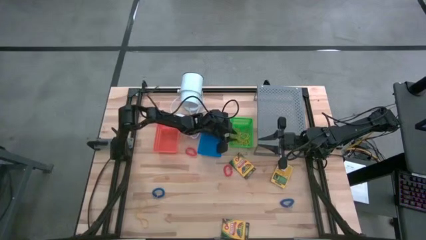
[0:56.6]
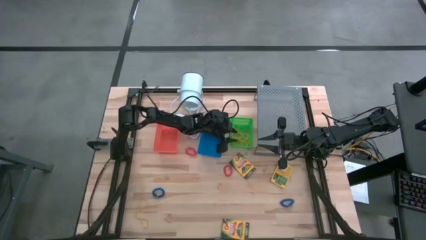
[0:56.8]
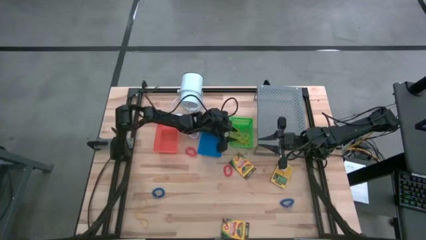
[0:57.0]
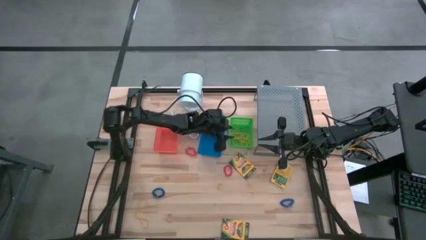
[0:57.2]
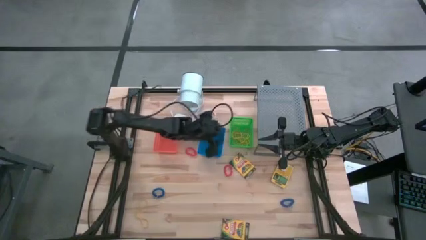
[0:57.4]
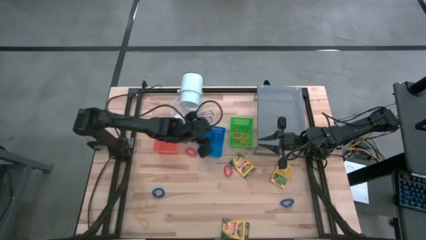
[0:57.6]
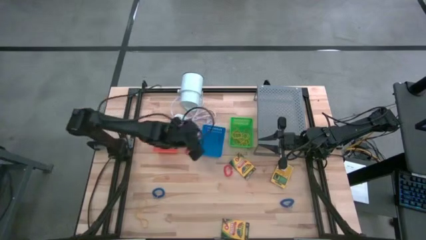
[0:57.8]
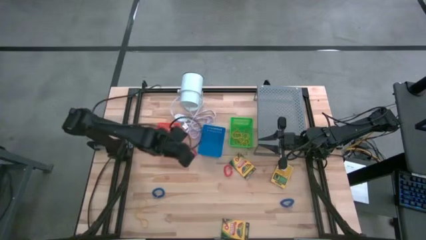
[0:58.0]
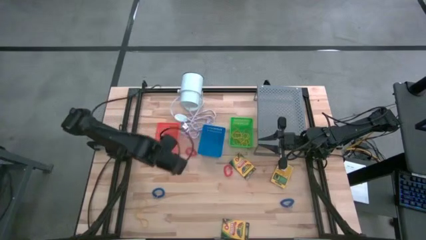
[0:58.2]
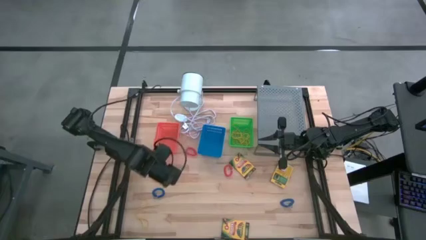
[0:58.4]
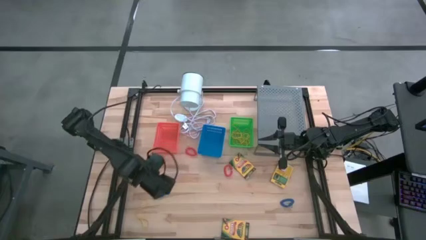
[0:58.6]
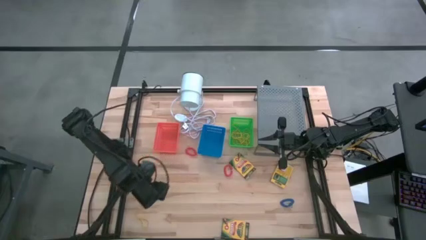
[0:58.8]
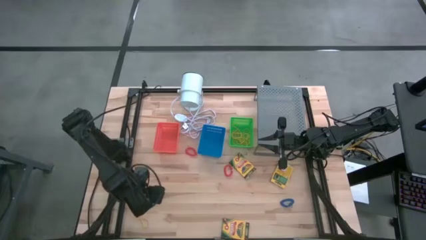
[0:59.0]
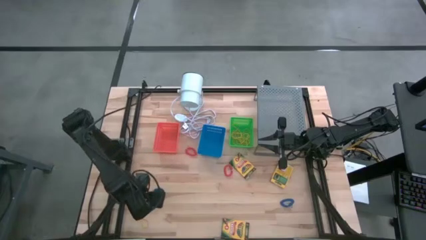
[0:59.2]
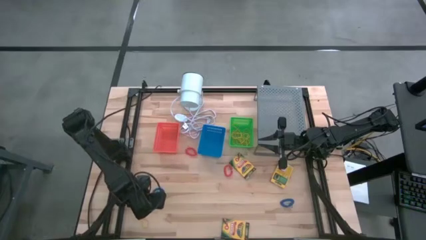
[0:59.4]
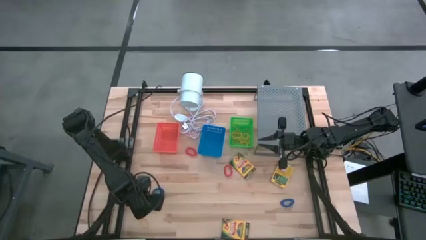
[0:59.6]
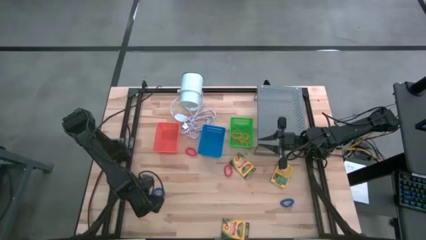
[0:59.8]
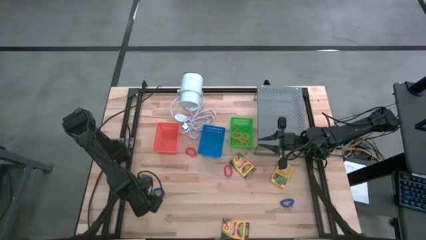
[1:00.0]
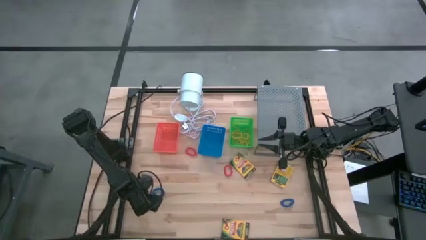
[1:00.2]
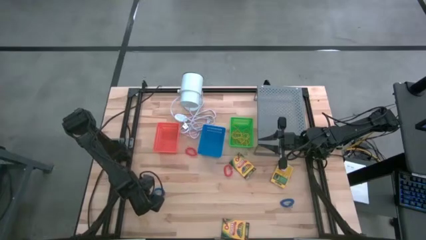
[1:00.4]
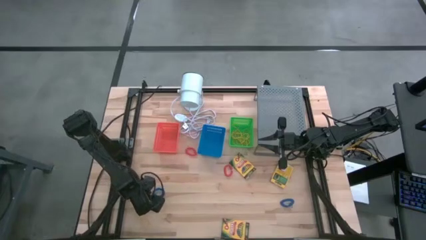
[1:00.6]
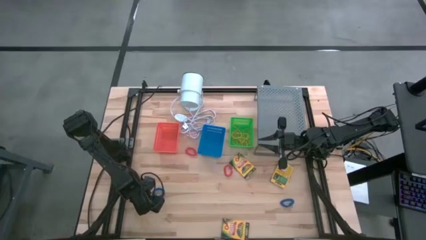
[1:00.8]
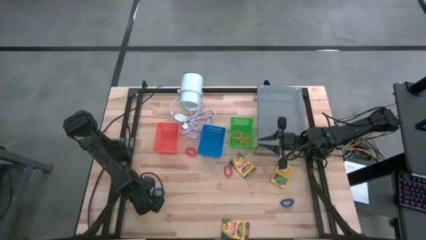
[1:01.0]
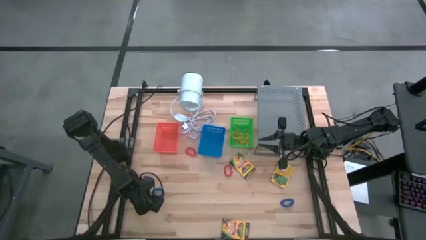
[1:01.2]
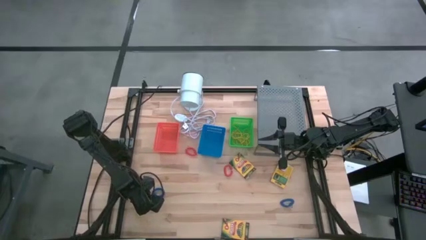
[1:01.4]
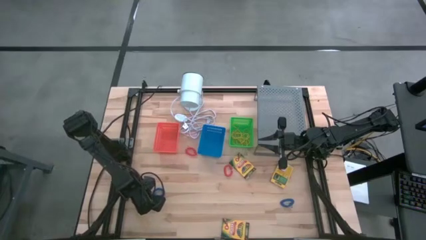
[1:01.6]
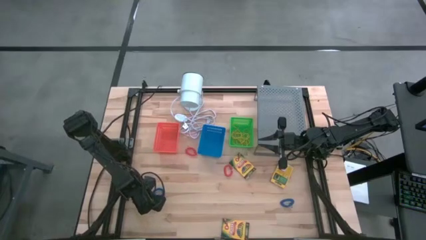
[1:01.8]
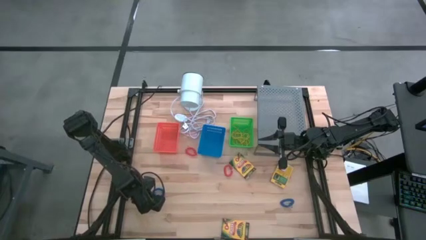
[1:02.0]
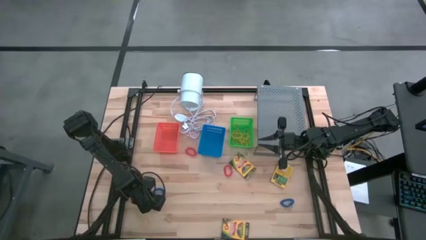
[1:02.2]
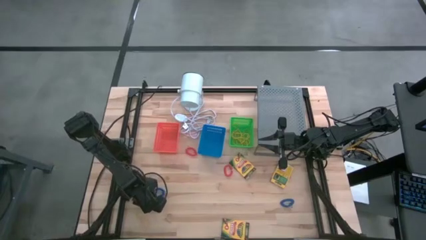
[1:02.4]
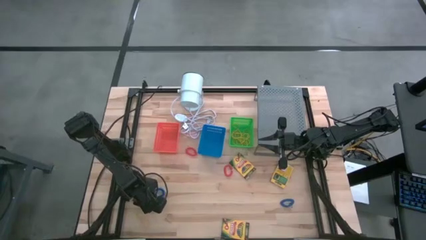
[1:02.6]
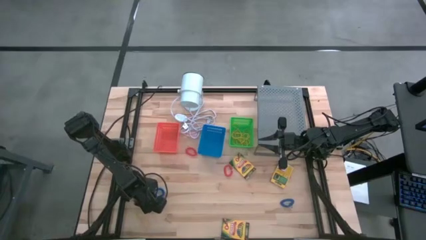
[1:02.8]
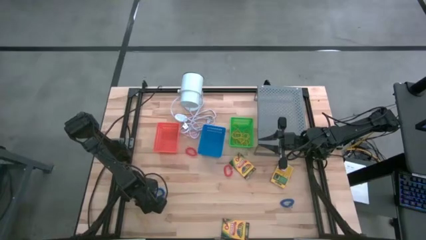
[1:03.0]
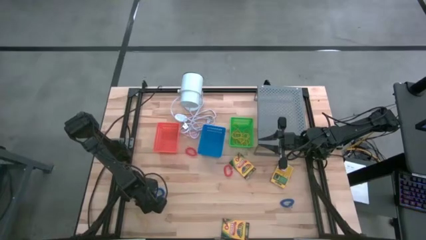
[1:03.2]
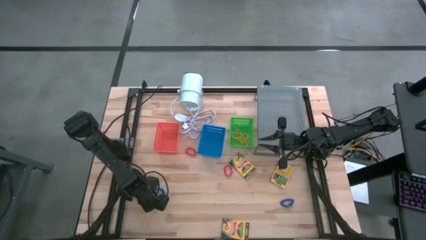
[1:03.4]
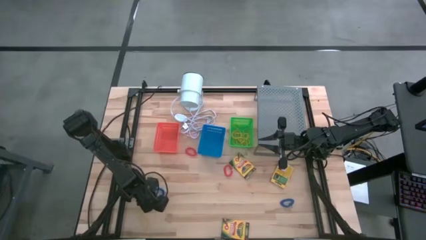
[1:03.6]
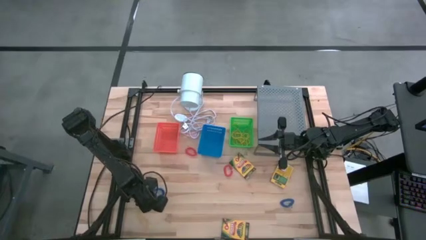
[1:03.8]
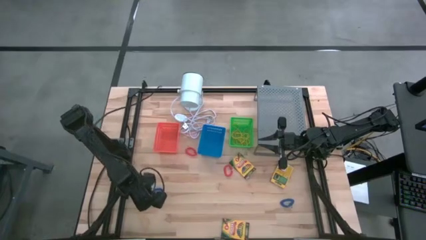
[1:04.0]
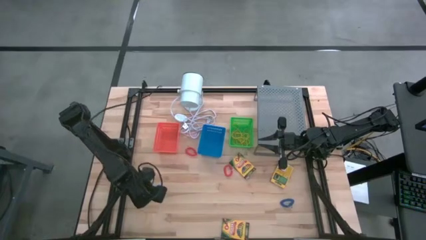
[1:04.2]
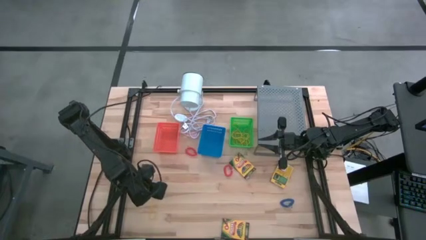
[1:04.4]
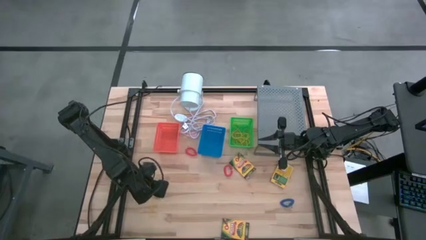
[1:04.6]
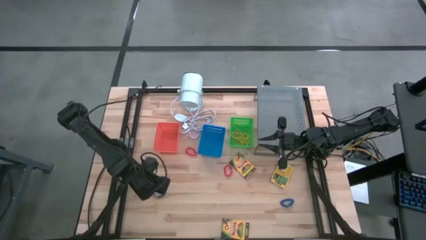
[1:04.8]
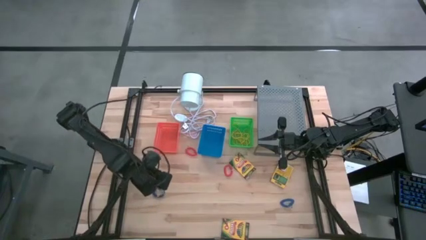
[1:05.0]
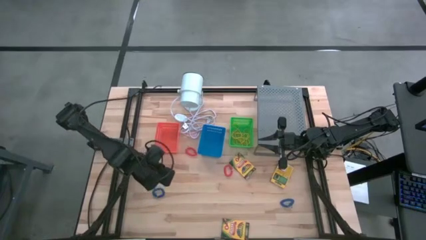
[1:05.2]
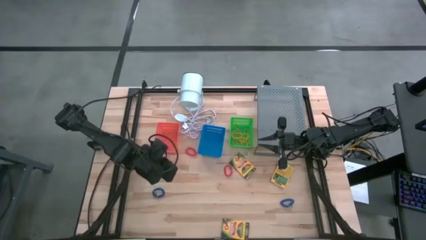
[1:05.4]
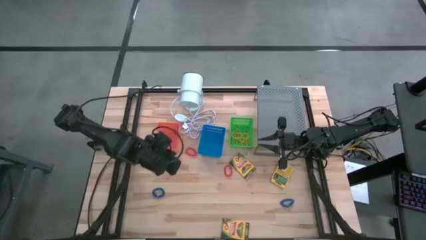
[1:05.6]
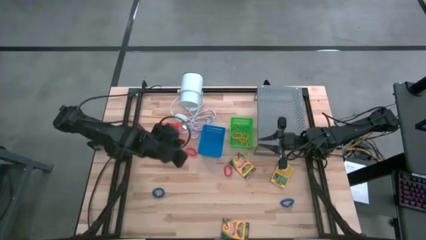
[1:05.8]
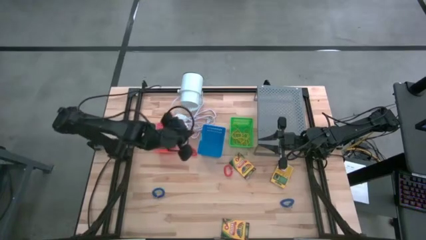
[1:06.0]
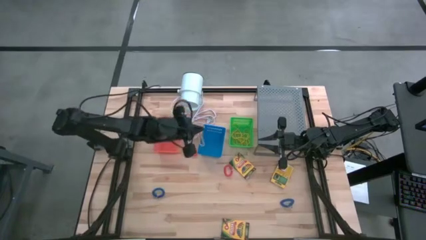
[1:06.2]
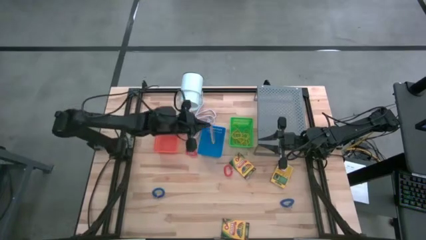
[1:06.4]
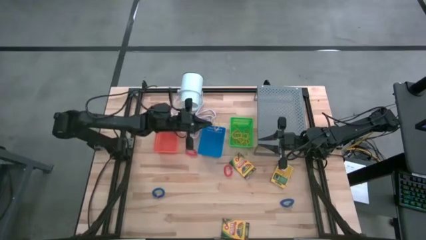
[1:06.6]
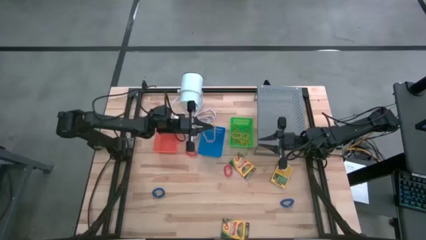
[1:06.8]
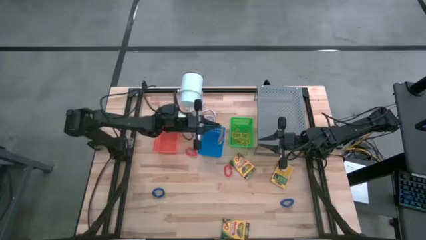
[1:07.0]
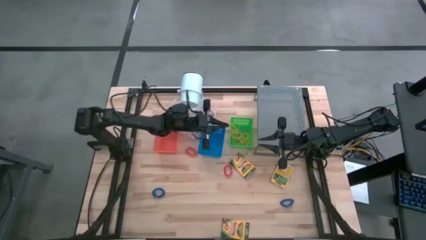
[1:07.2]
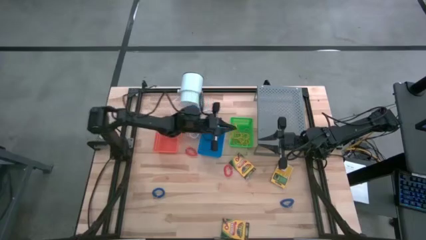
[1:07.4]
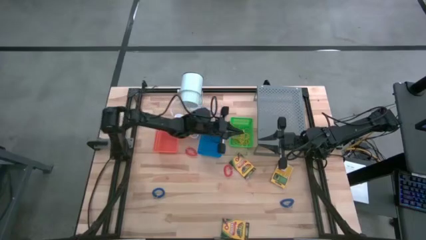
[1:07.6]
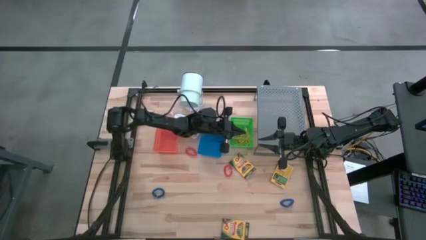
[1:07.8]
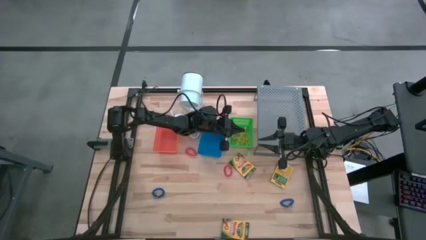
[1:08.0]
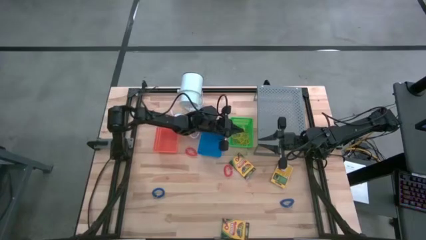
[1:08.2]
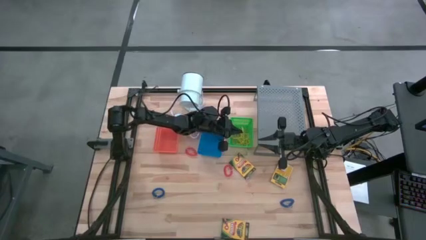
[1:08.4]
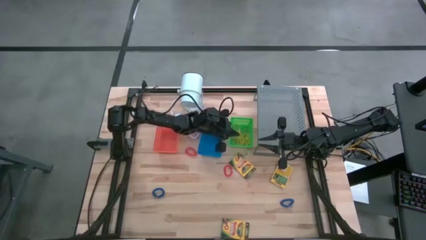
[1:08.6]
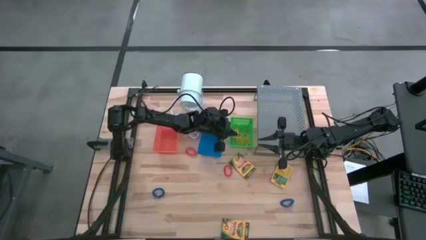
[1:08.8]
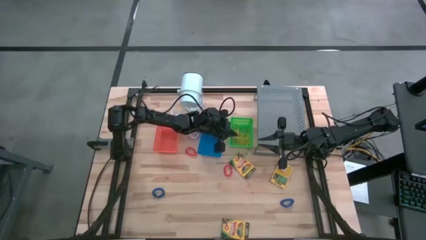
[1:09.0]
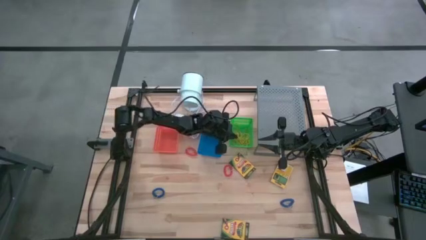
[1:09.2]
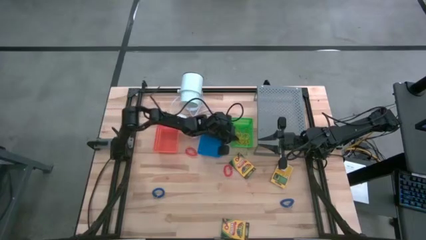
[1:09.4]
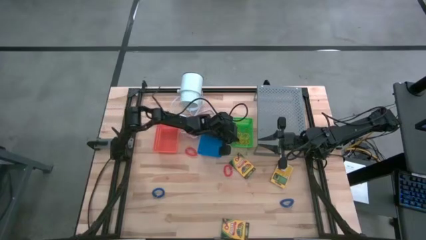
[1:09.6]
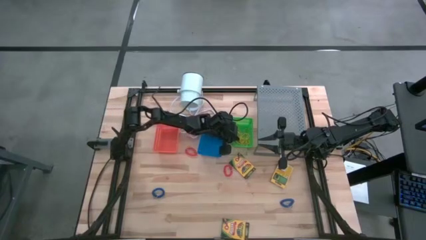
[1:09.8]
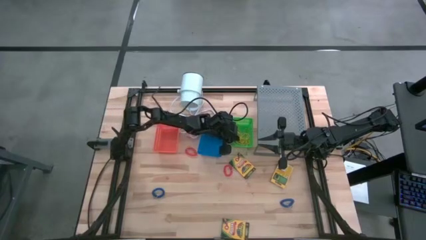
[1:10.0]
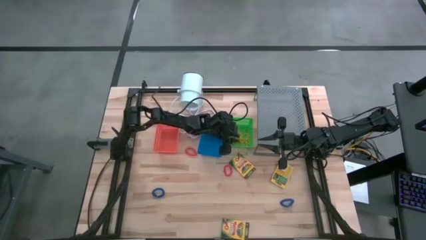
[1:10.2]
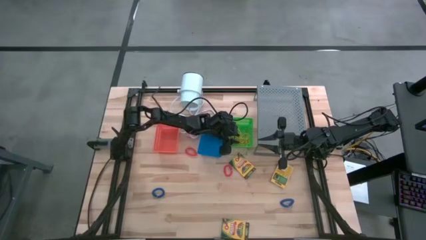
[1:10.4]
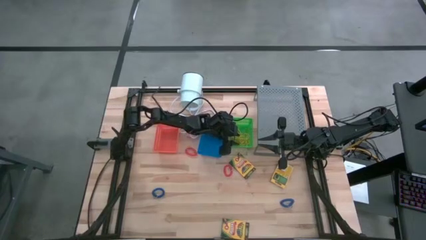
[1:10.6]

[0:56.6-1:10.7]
Task: Pick & Place Office Desk Supplies
Put the yellow rubber band into the green bin
